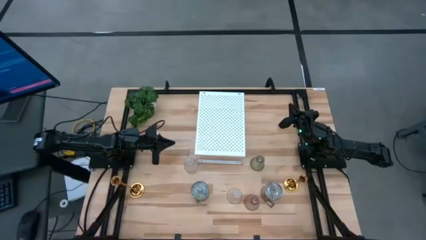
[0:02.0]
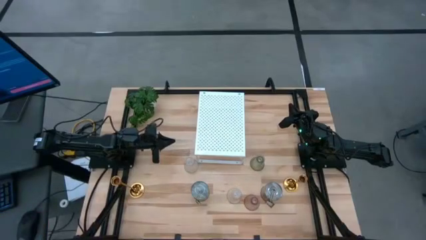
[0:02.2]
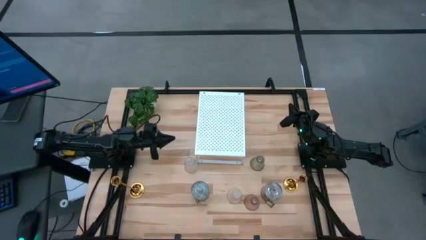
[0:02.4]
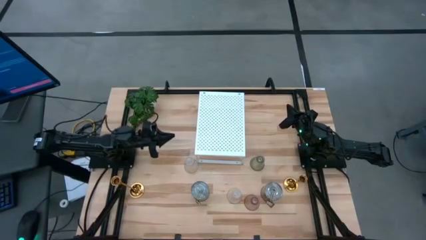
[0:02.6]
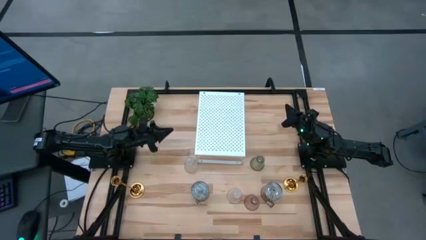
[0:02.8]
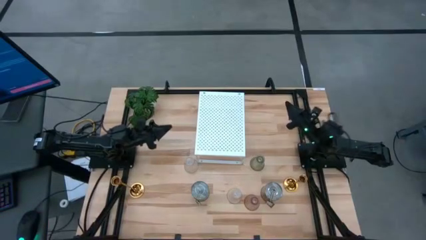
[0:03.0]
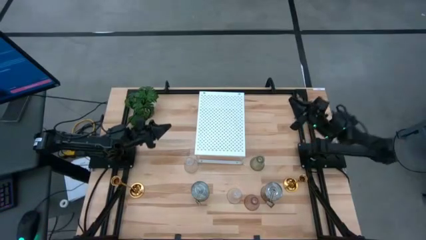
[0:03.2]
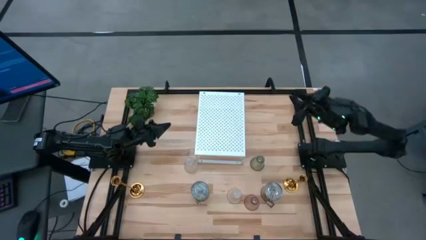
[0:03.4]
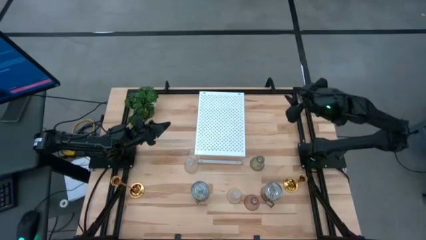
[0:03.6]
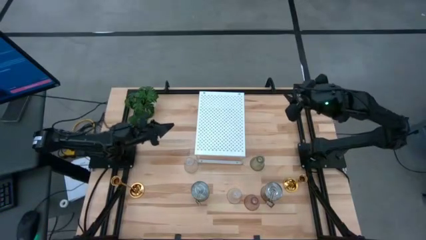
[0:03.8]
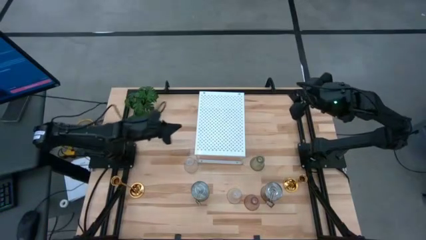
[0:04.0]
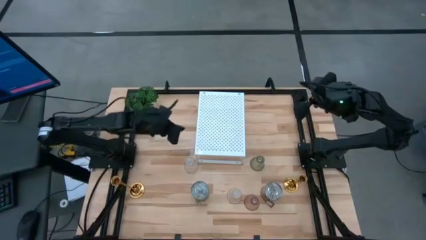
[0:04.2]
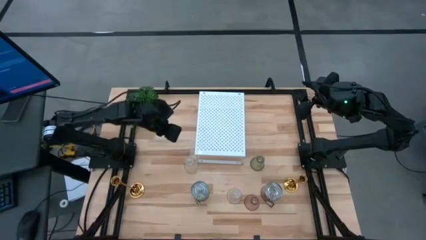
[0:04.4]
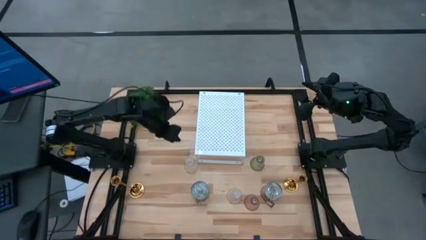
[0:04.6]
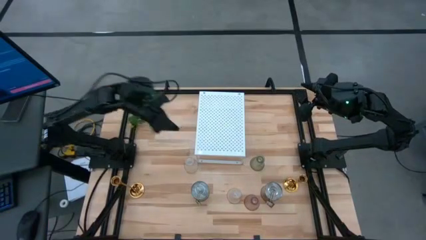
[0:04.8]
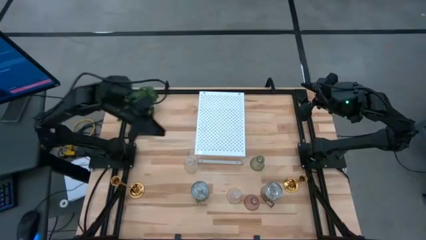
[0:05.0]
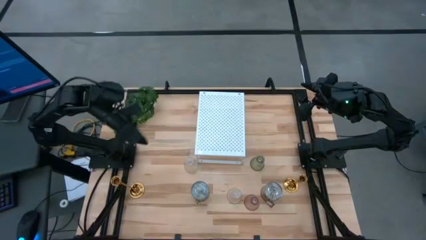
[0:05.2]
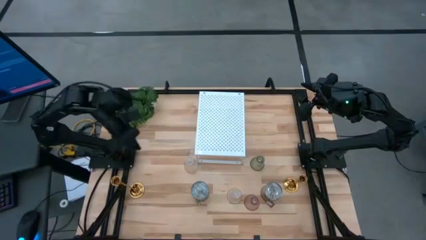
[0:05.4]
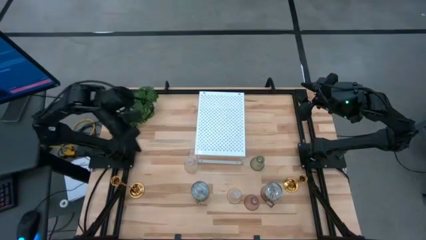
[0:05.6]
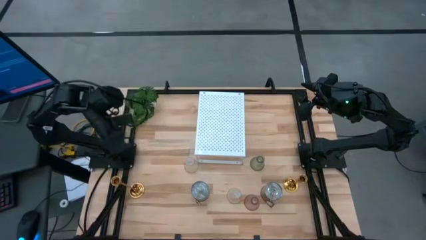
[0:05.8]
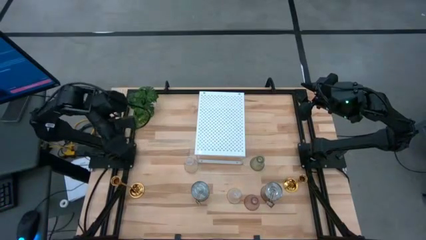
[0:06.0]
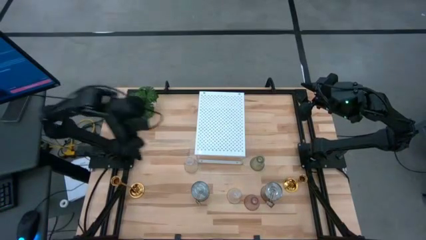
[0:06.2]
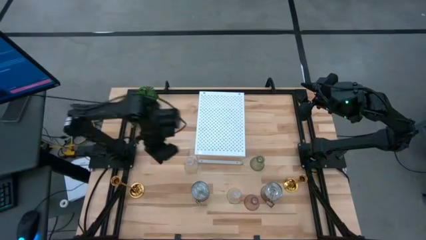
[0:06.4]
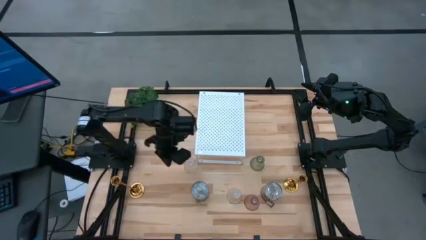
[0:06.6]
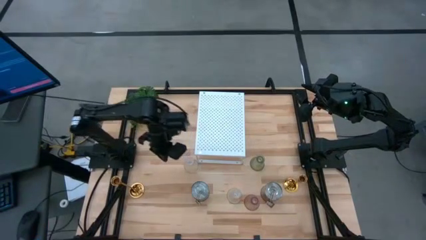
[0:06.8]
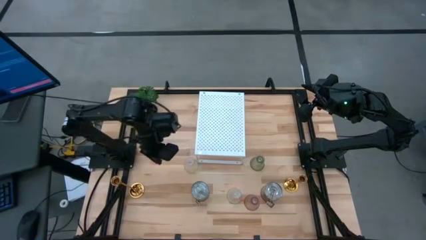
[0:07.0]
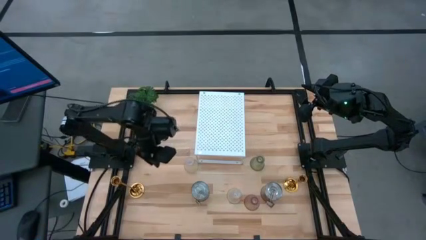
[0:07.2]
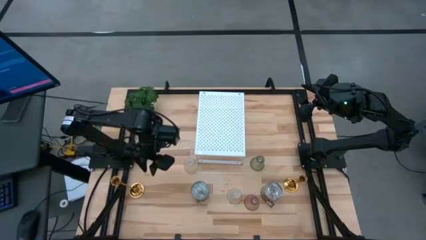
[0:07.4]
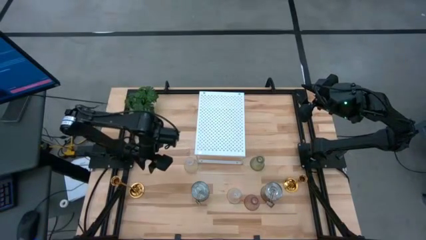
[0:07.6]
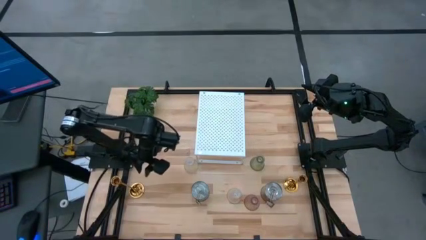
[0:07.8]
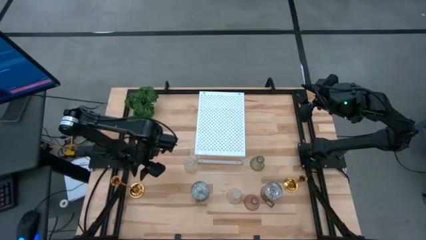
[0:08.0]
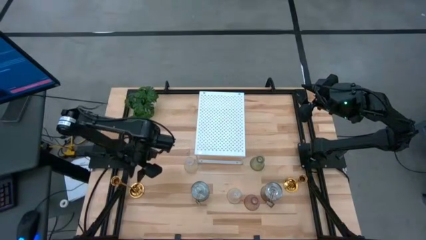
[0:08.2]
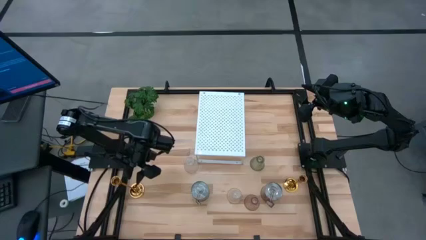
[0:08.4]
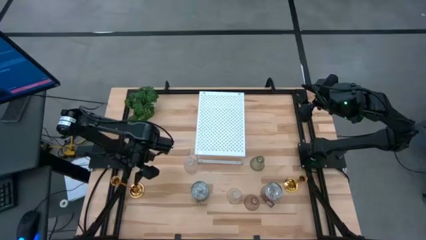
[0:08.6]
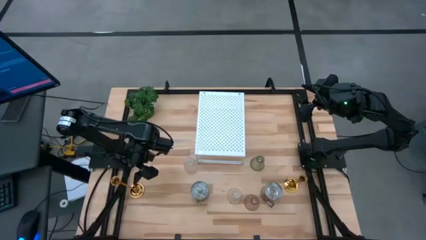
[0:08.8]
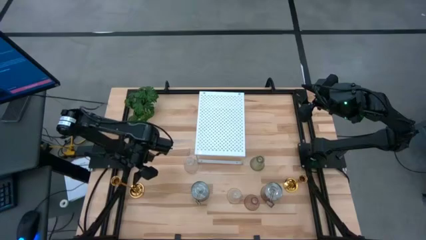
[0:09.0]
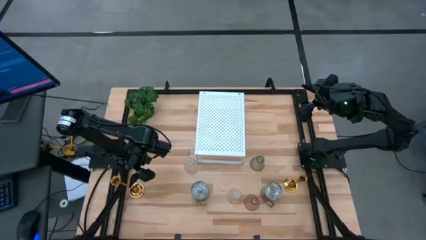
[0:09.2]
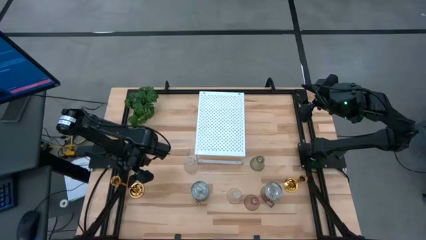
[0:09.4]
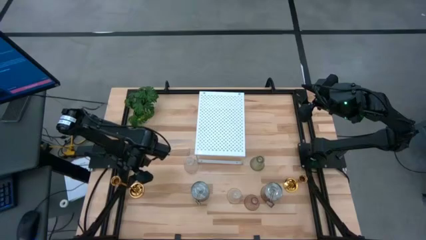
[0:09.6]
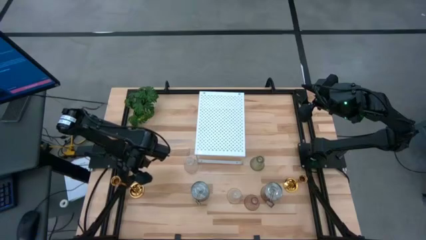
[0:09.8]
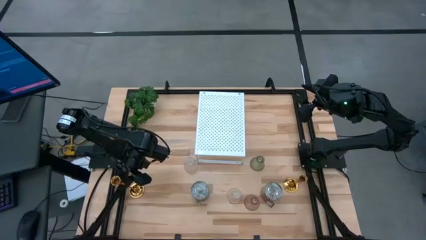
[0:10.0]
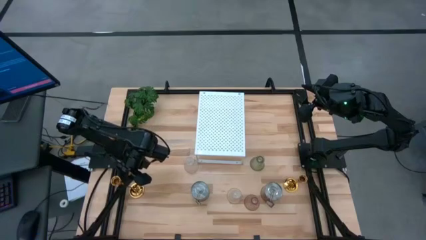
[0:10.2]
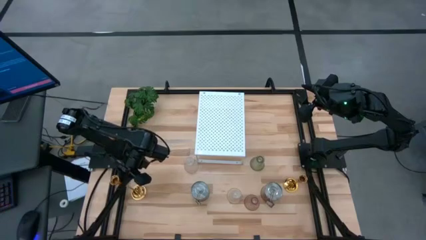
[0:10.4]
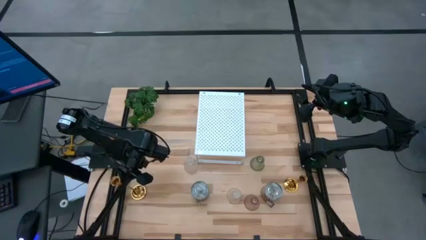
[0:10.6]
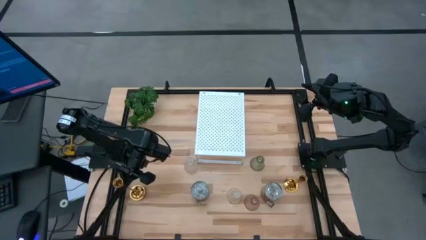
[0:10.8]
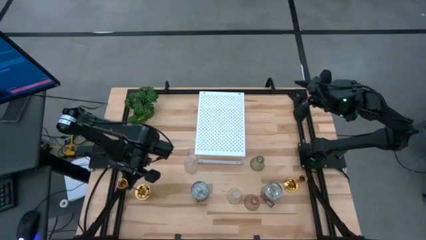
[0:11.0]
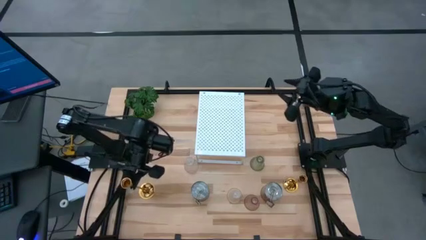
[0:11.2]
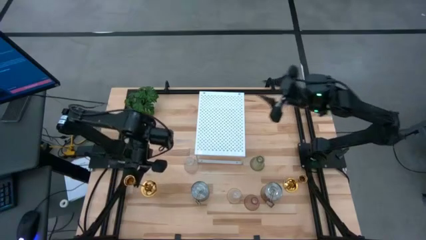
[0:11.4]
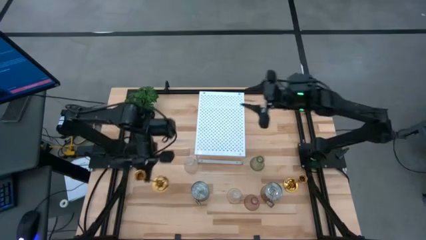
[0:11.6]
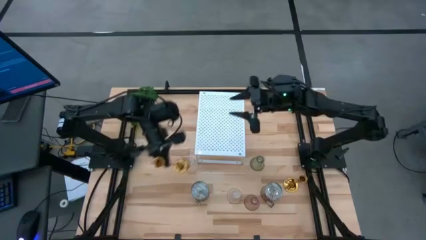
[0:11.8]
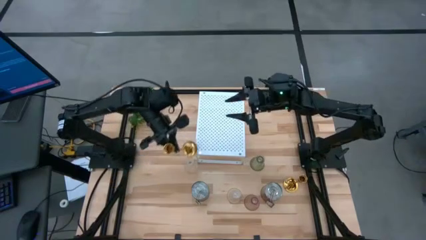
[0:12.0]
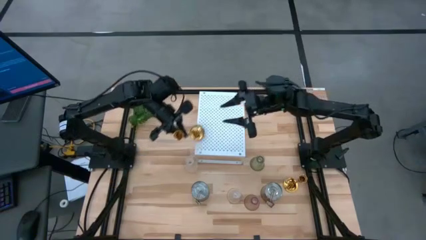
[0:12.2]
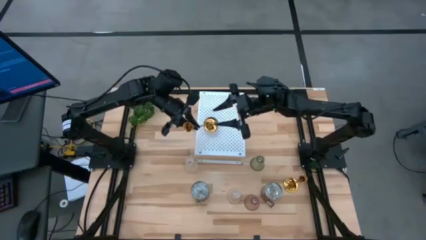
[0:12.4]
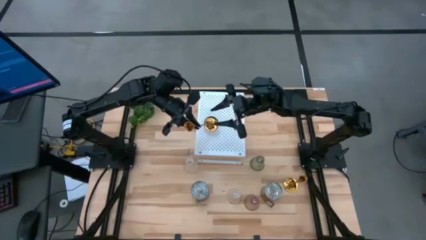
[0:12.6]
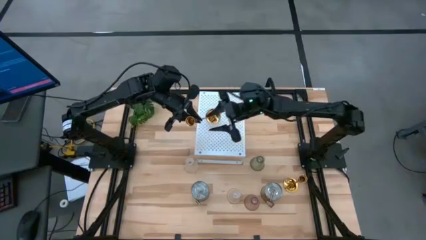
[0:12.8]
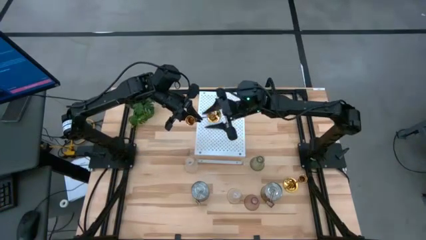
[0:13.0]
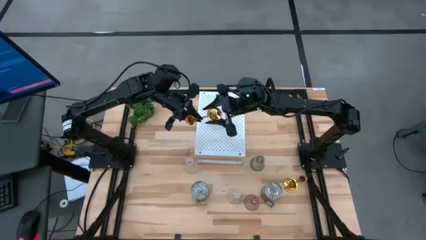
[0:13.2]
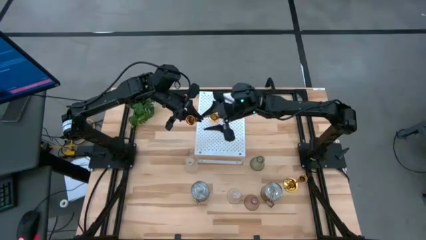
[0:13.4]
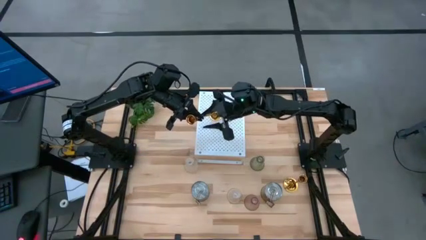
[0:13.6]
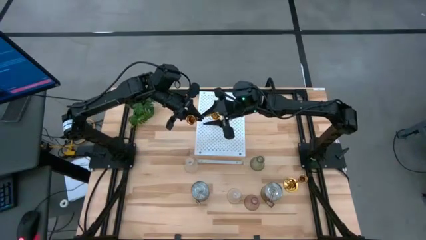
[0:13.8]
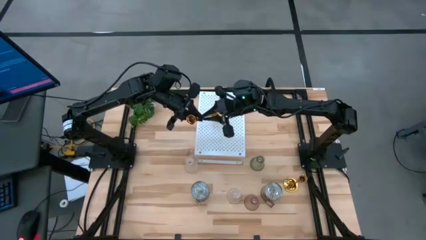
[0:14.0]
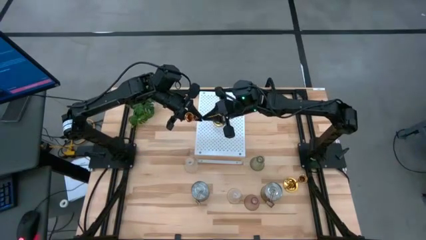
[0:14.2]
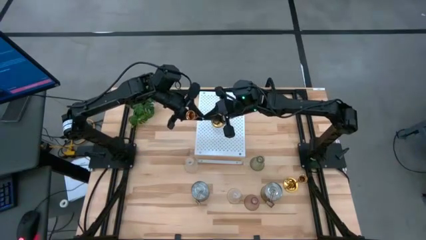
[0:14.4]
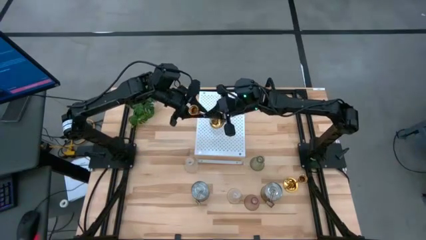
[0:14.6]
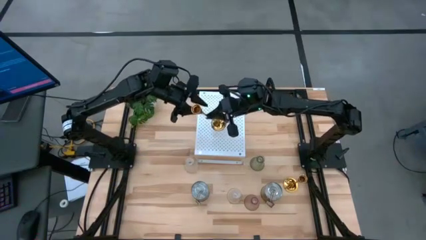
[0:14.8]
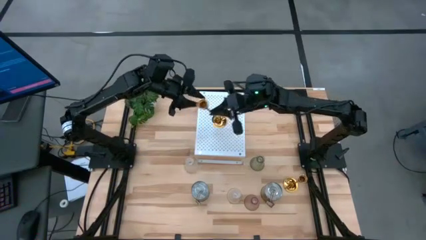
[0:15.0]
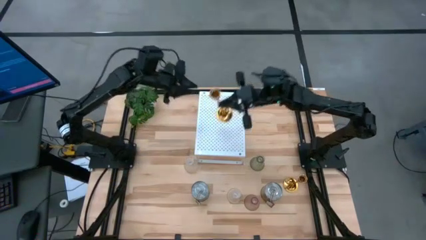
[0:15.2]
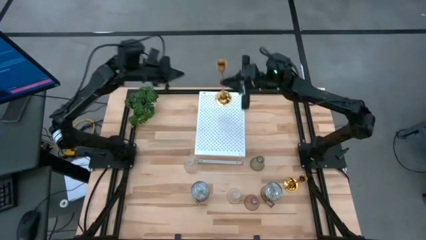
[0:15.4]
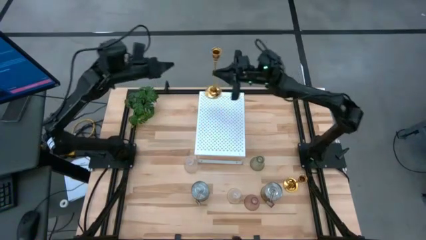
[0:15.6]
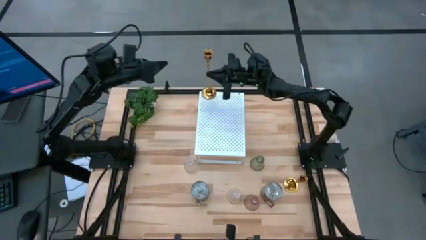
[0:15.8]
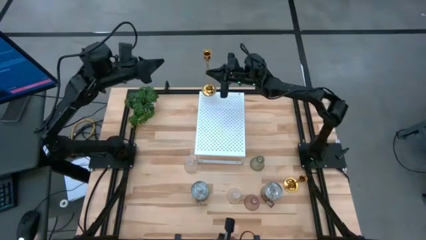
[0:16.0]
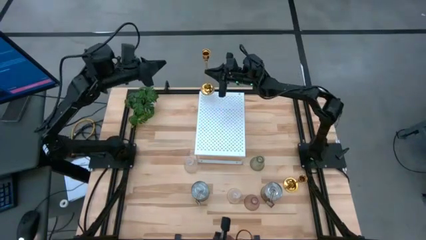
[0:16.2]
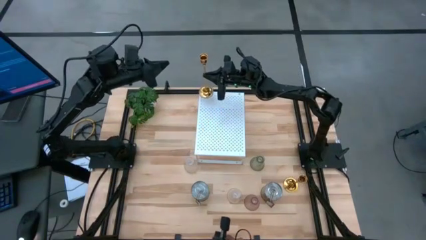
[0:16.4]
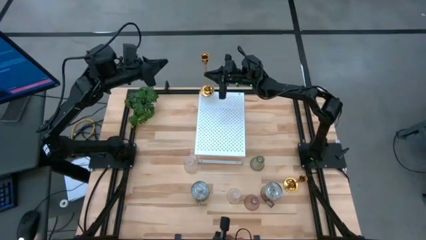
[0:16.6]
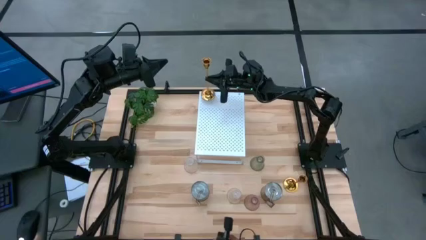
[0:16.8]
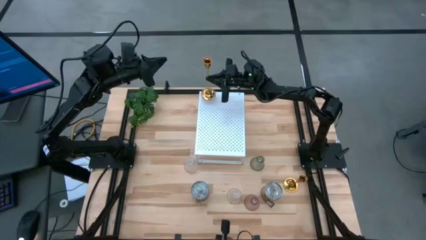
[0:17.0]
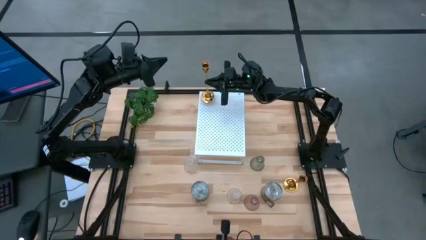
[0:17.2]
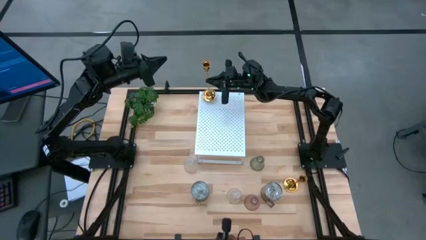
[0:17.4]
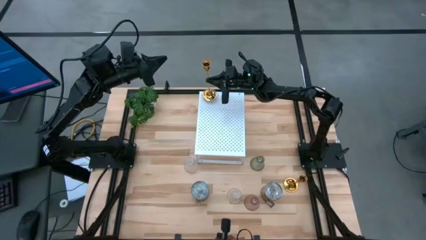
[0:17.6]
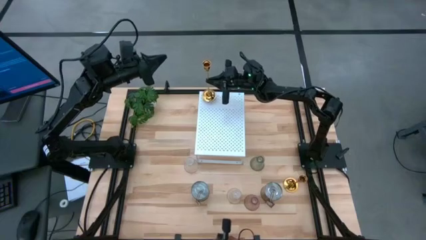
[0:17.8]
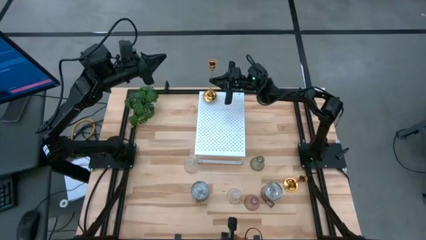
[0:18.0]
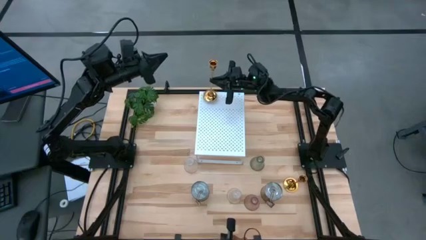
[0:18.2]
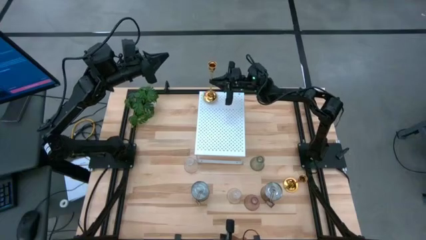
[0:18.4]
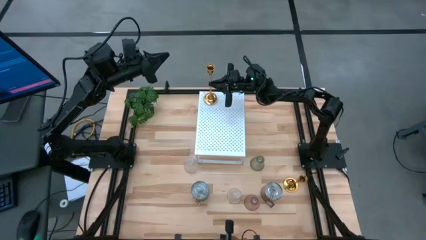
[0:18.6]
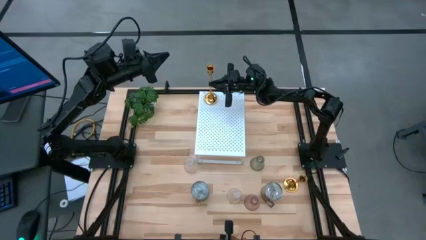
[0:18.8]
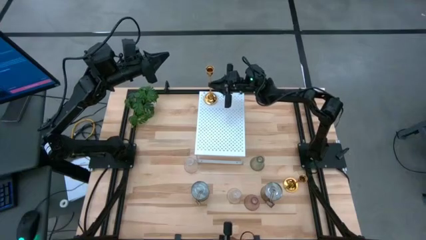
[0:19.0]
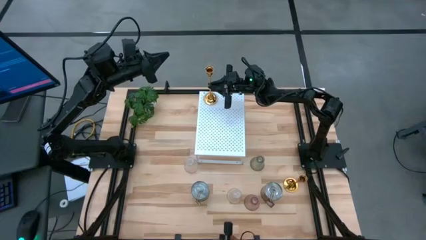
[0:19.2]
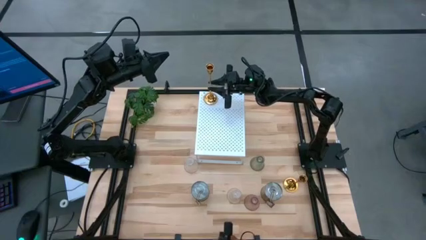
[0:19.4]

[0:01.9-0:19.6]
Task: Pick & Place candle stick holders
Put the left gold candle holder on the shelf
